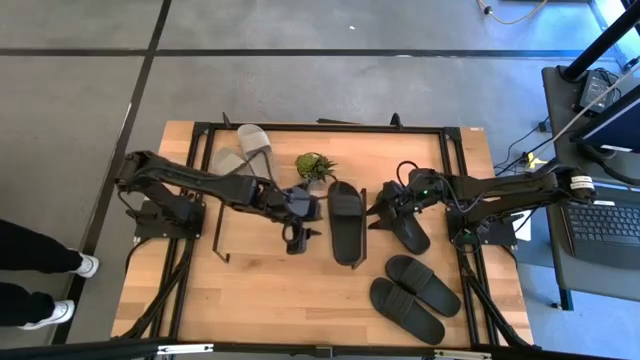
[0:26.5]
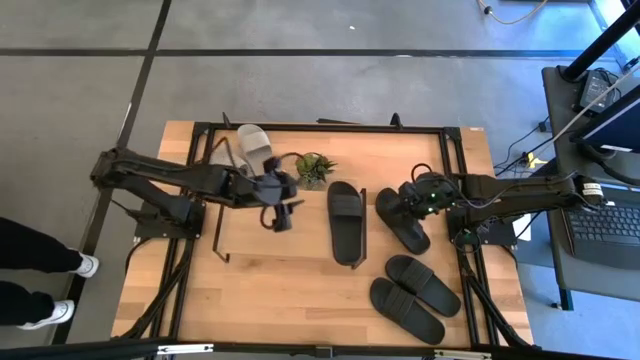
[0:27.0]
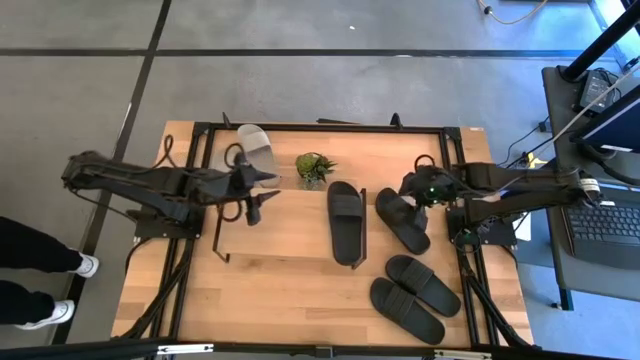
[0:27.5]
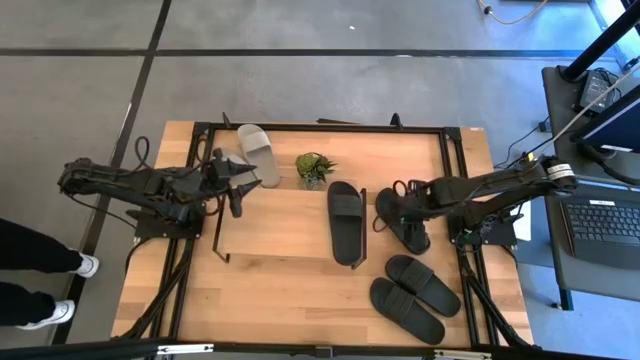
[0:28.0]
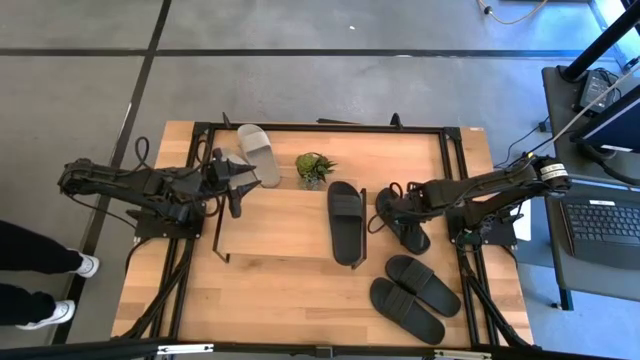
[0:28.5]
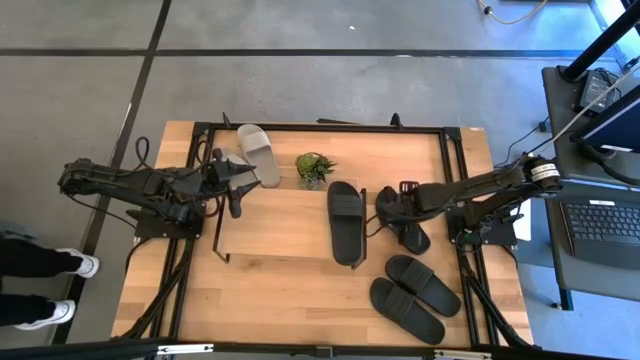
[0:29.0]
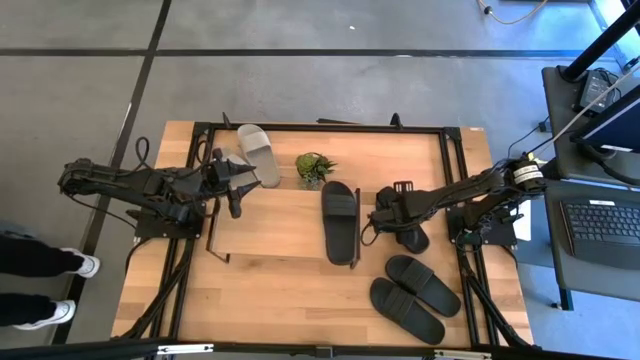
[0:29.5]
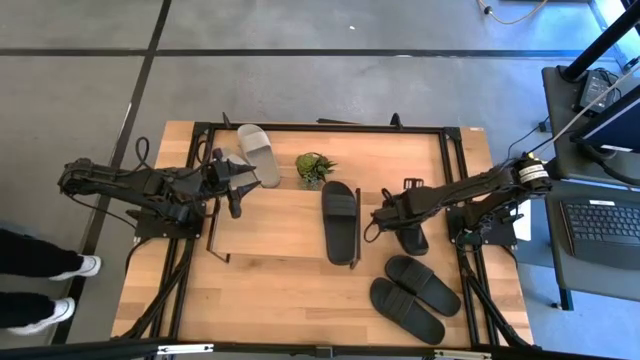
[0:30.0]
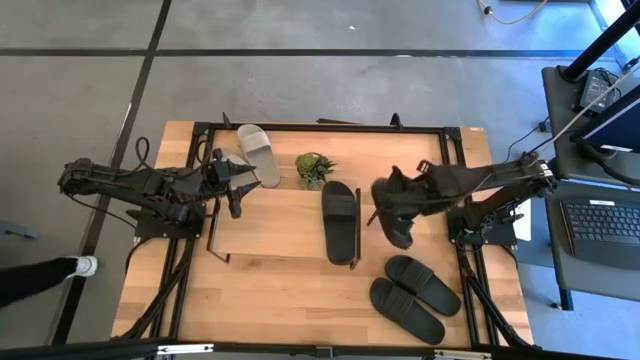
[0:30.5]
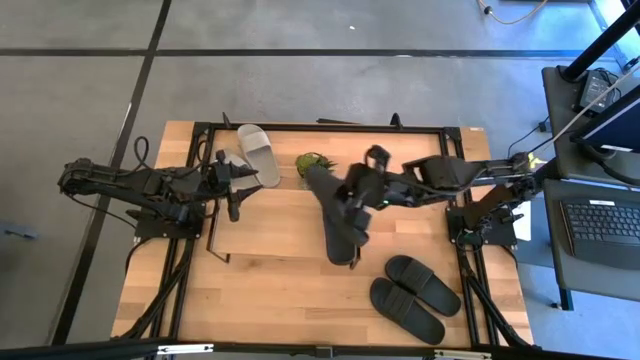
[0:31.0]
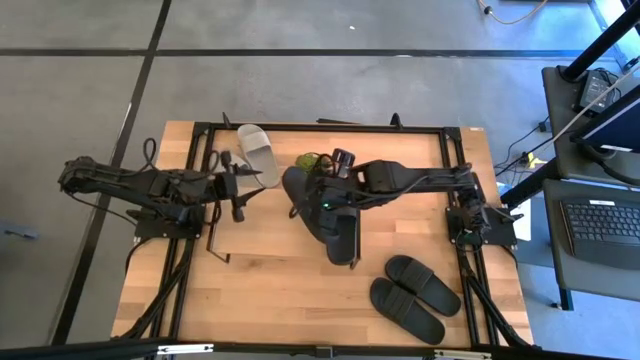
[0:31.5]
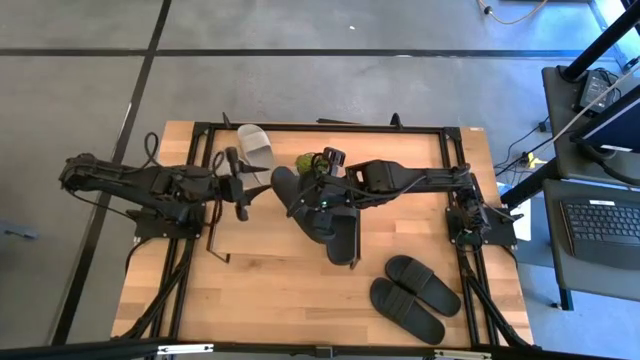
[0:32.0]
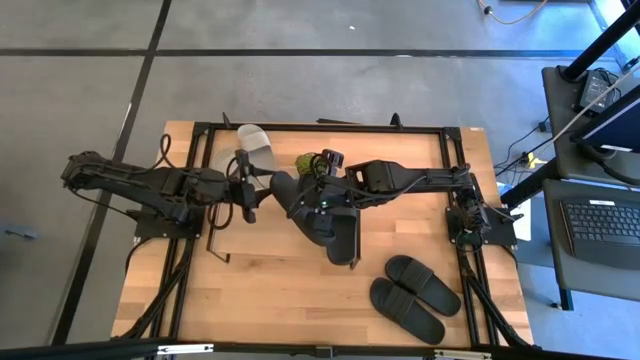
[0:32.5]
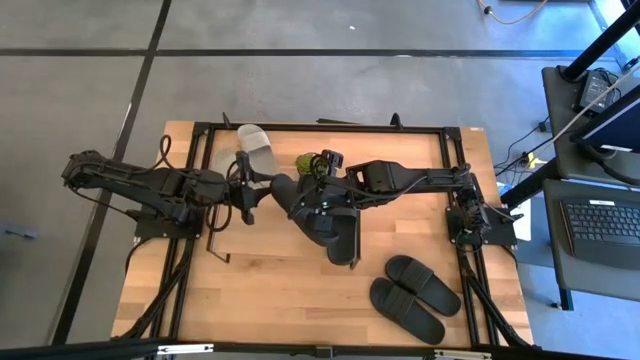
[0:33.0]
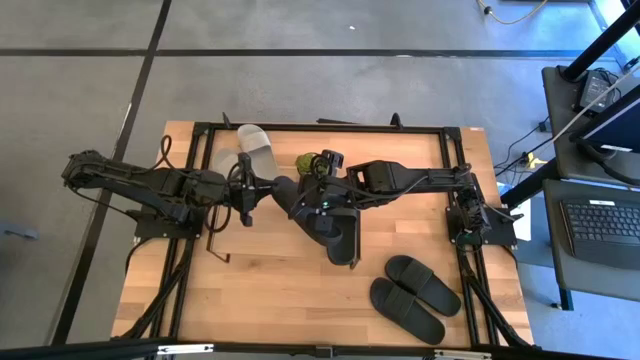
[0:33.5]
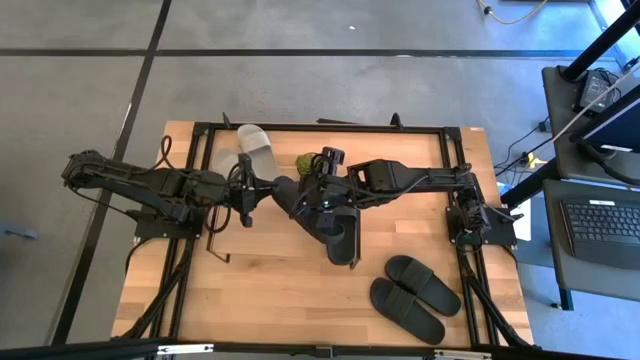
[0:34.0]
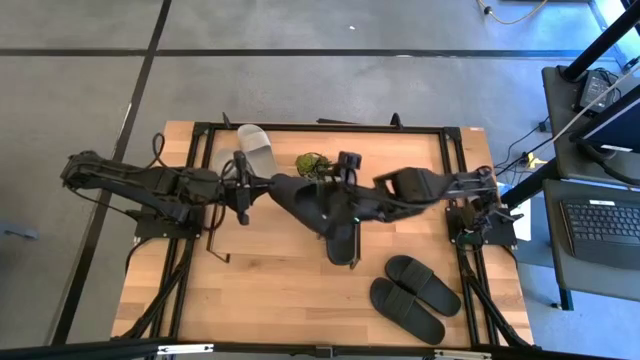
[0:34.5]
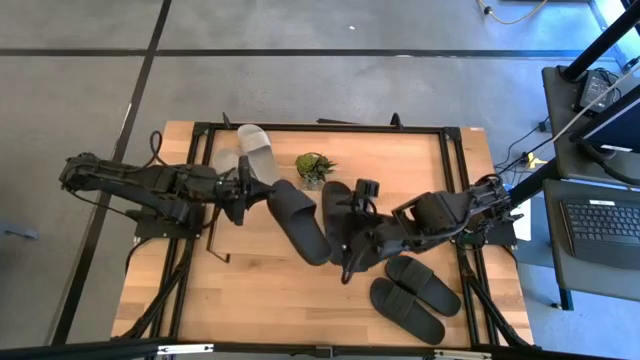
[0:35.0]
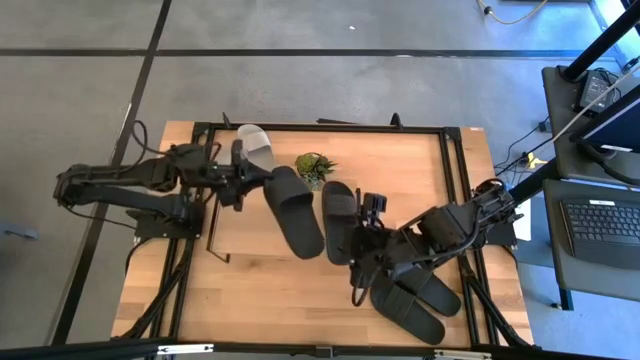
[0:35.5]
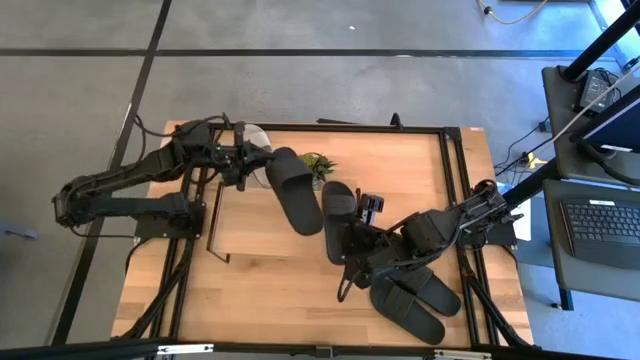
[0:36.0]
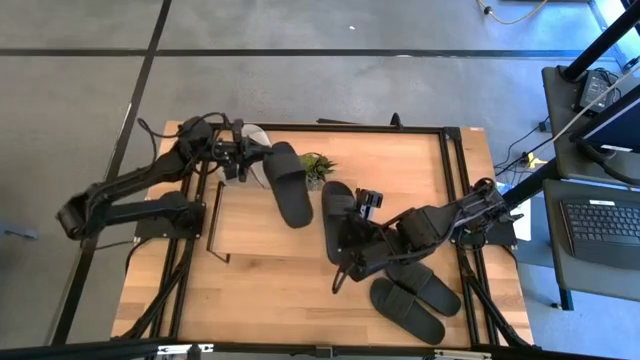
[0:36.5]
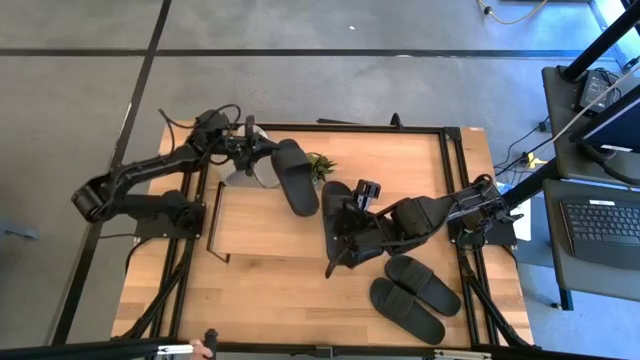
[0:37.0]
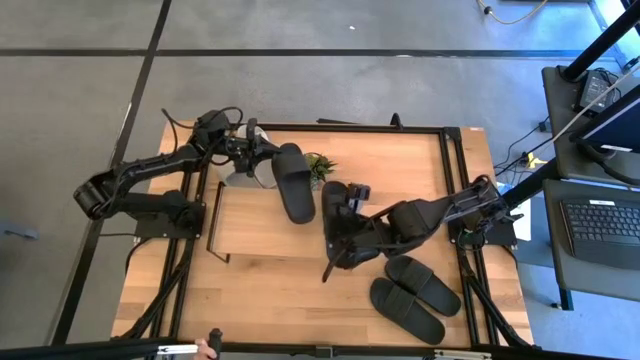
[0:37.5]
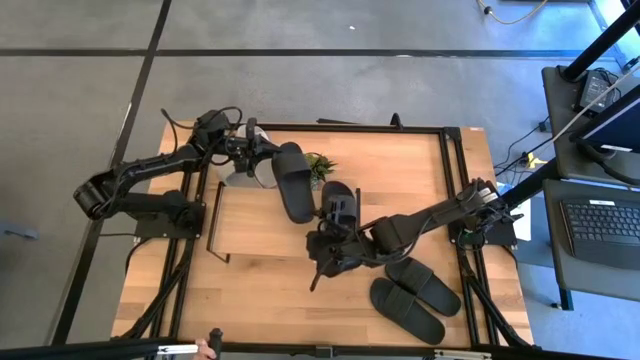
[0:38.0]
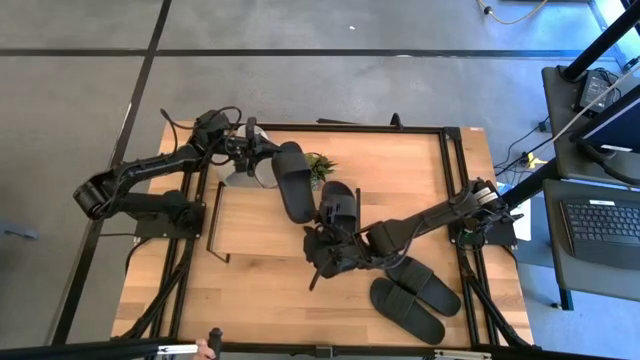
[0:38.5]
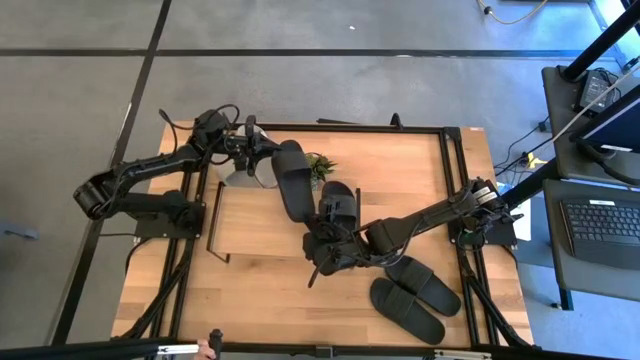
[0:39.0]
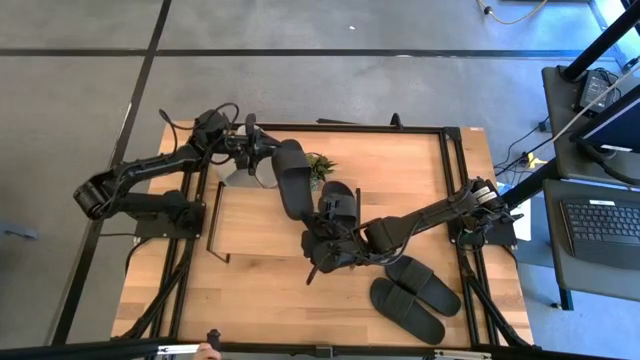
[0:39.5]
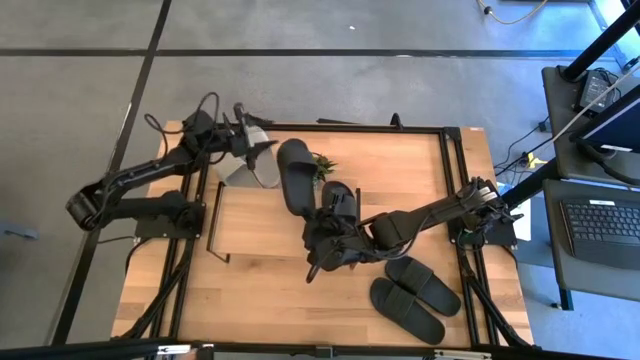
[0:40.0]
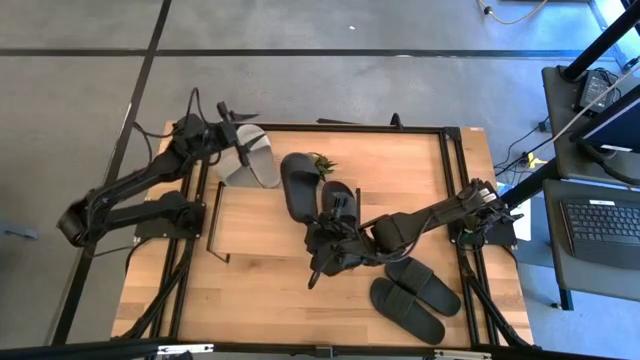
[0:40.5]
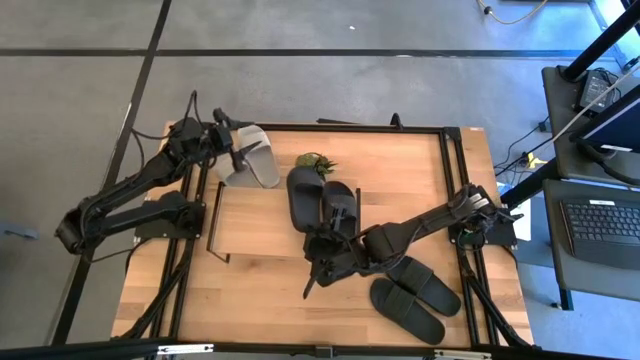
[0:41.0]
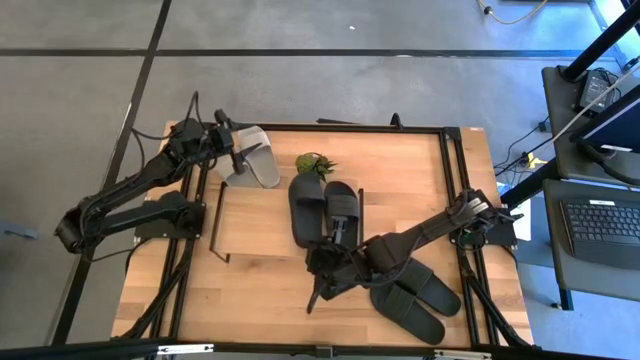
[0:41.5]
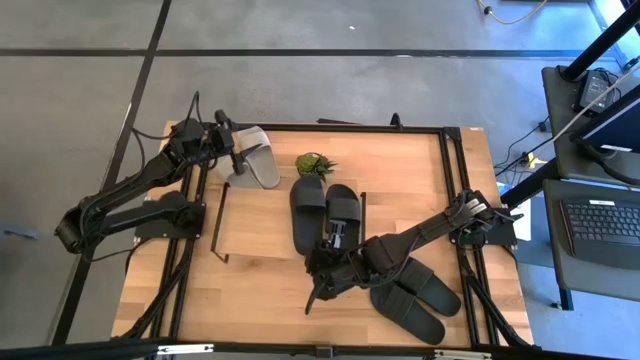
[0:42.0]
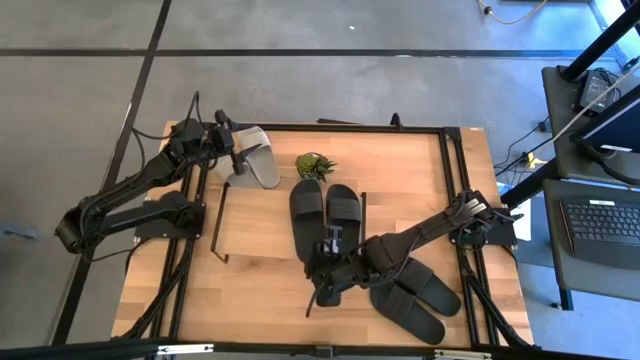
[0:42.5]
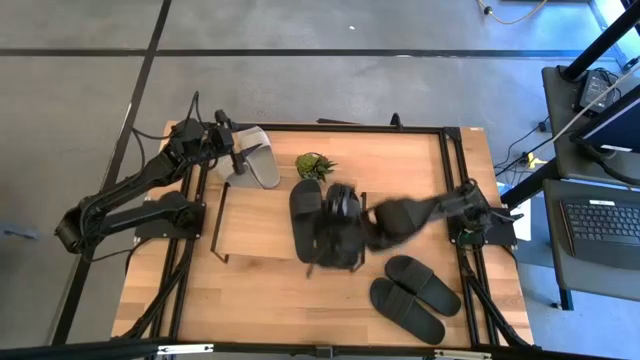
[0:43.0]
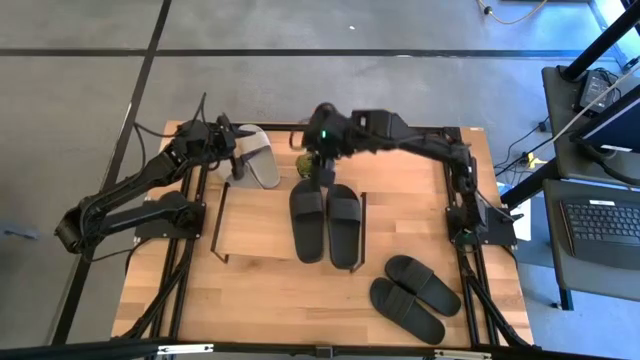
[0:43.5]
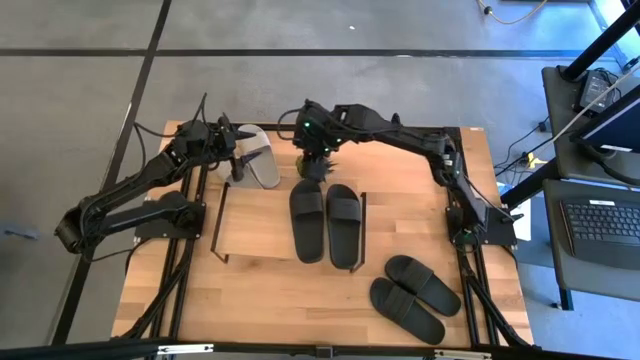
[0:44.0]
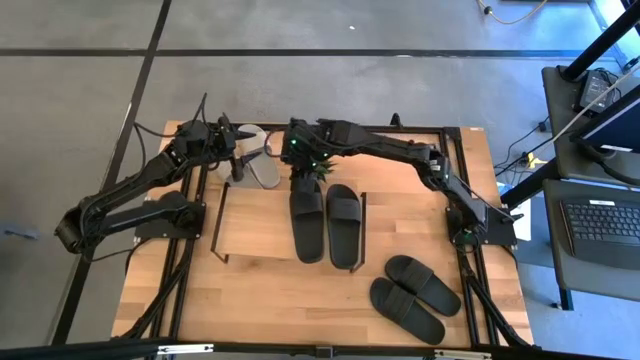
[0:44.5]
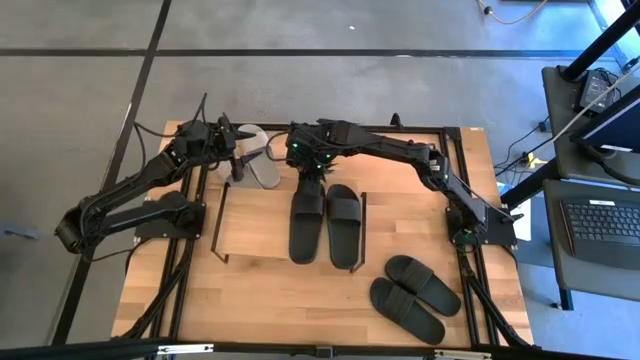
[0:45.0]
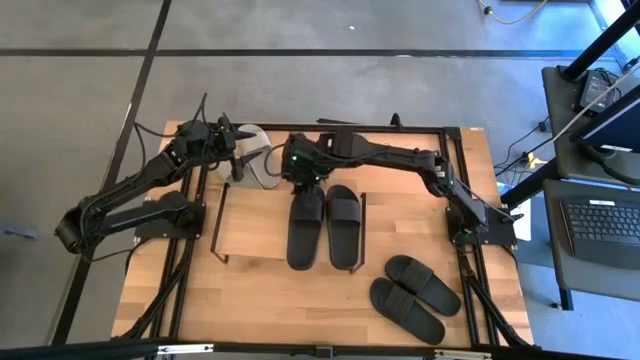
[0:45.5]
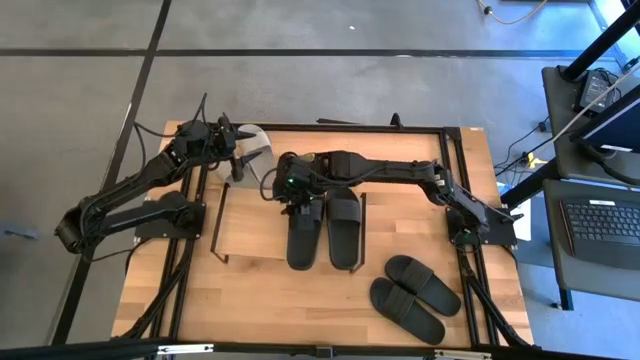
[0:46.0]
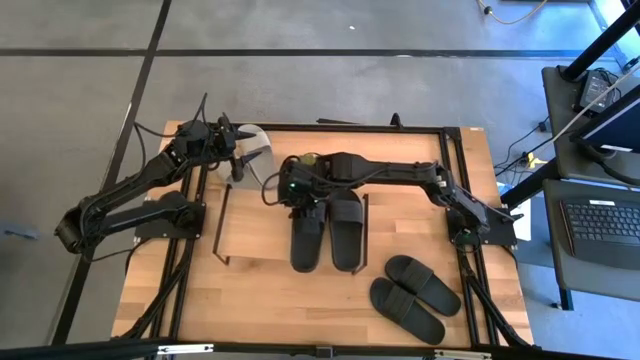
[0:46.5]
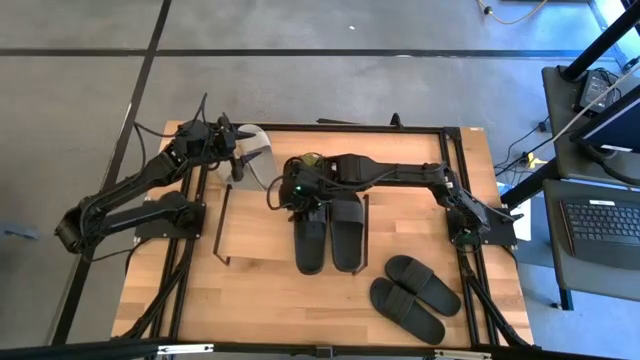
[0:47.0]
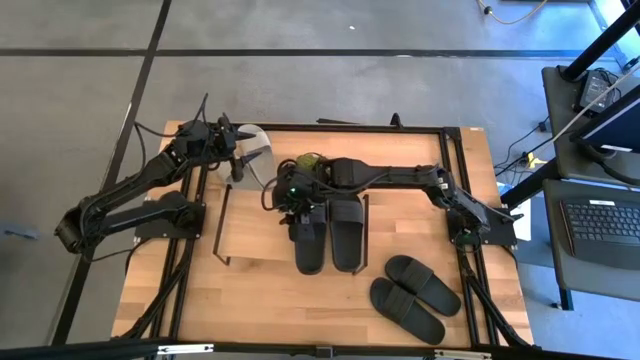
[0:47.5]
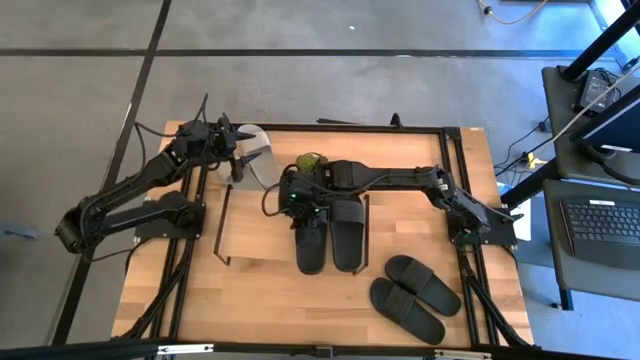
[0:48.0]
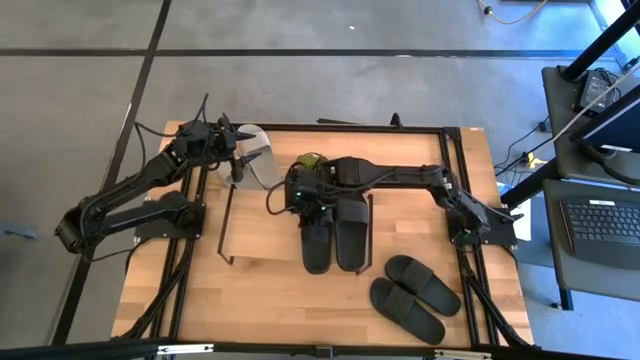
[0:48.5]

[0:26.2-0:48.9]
Task: Pick and place slides into the shelf
Put the black slide on the shelf
